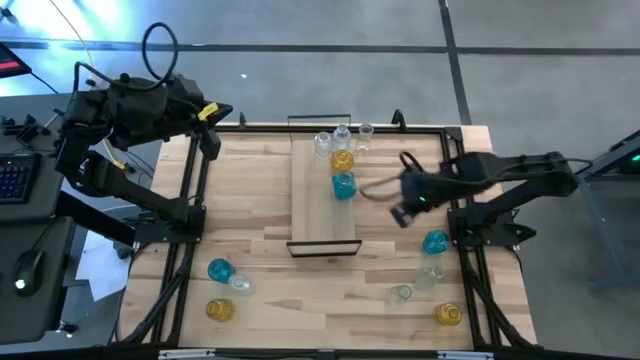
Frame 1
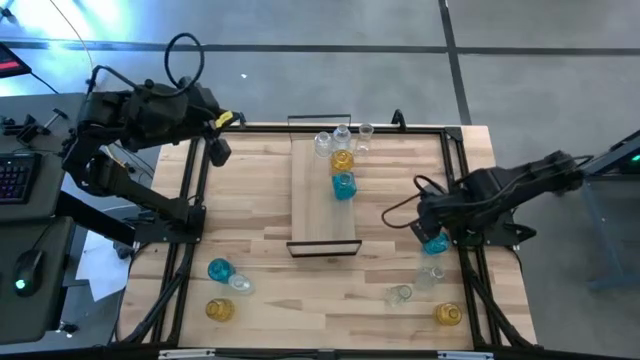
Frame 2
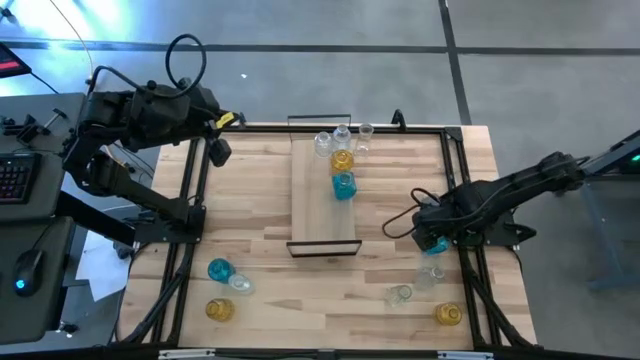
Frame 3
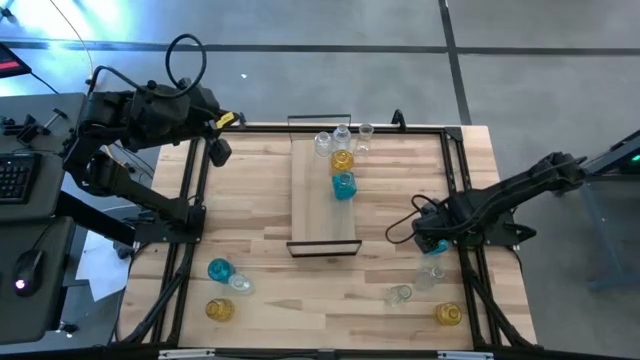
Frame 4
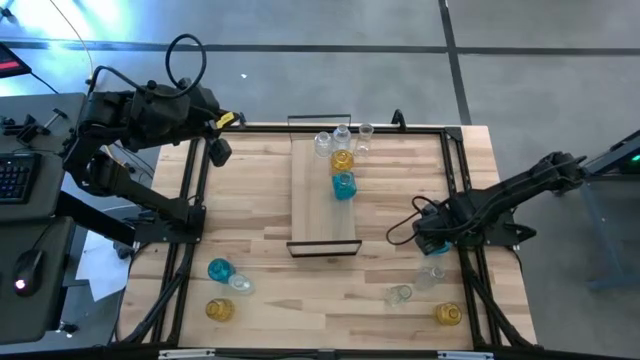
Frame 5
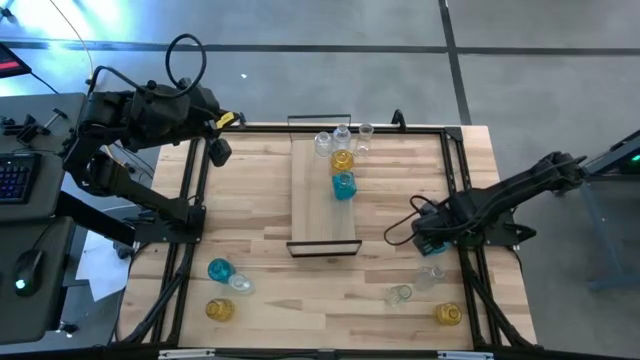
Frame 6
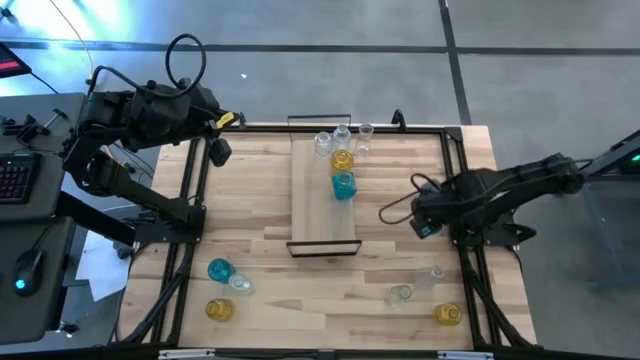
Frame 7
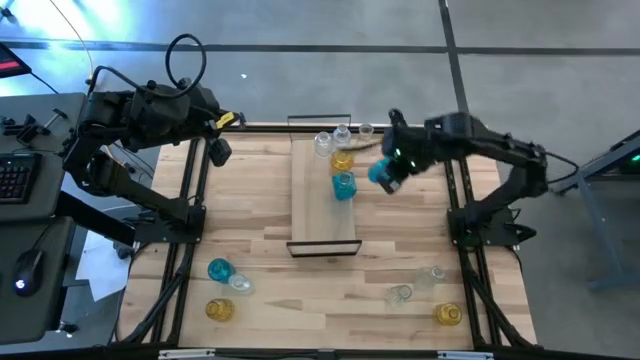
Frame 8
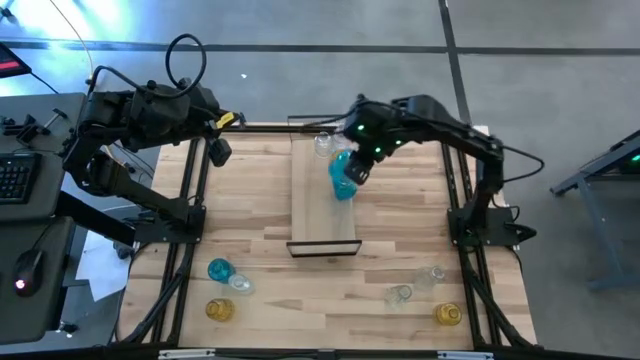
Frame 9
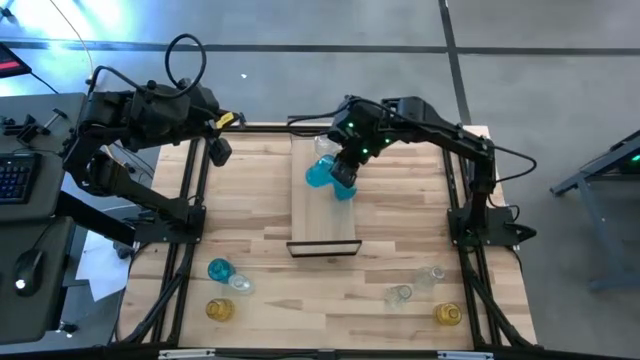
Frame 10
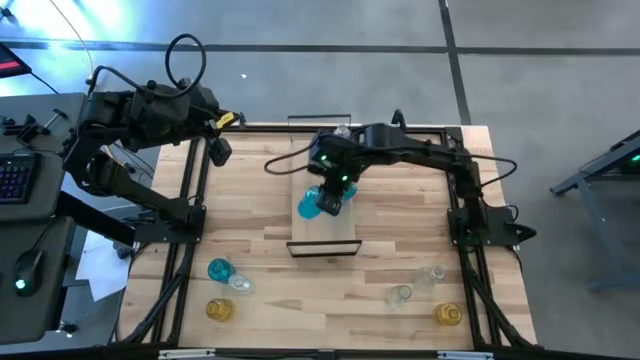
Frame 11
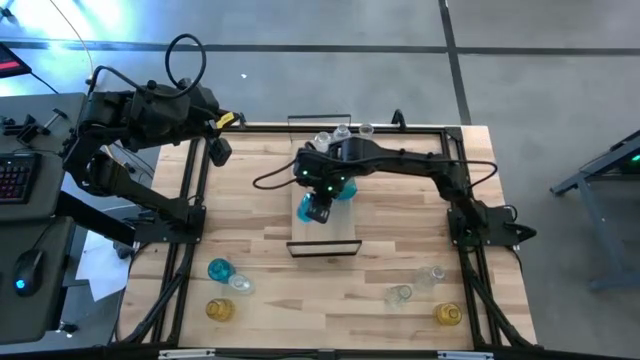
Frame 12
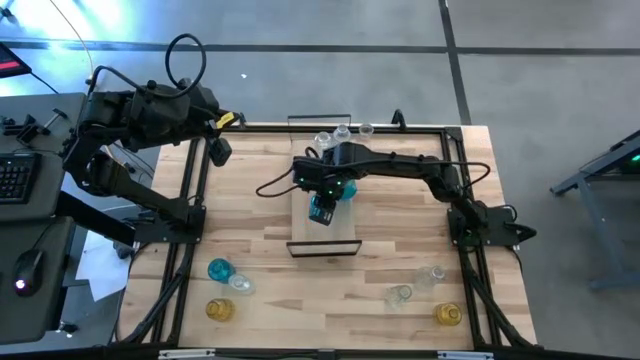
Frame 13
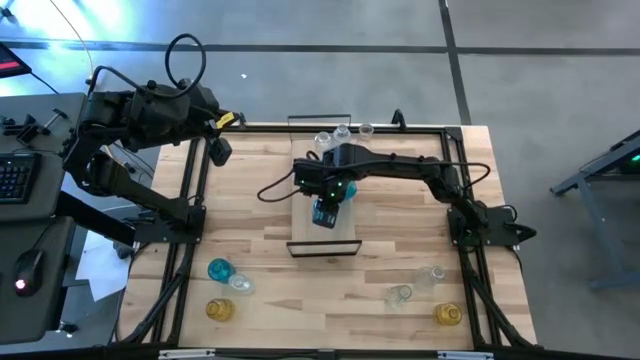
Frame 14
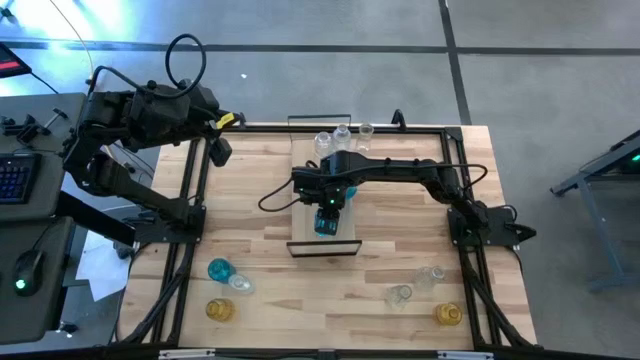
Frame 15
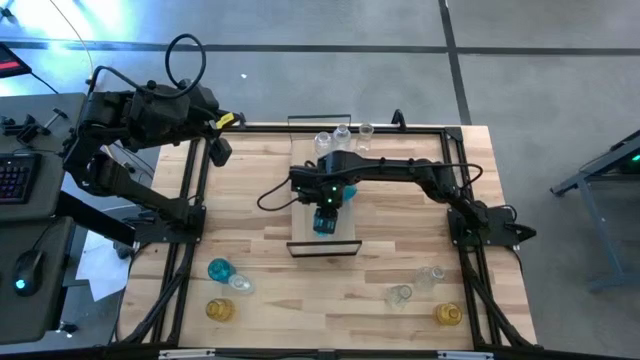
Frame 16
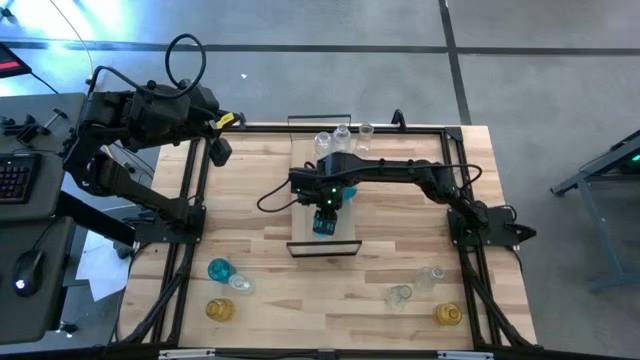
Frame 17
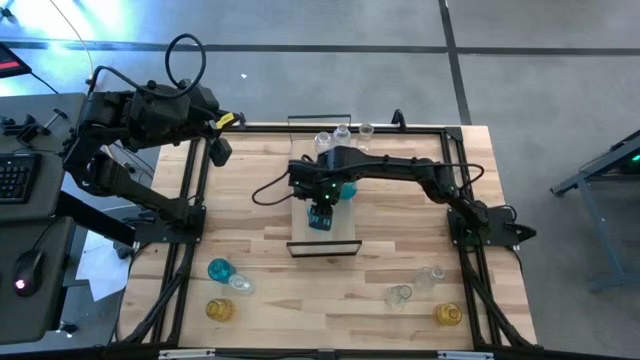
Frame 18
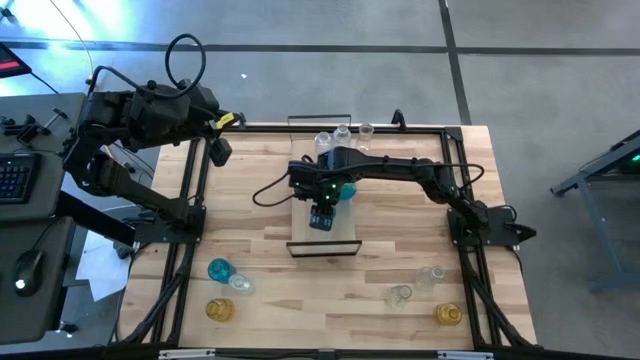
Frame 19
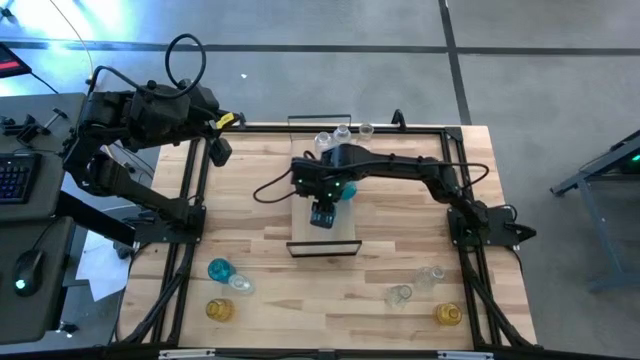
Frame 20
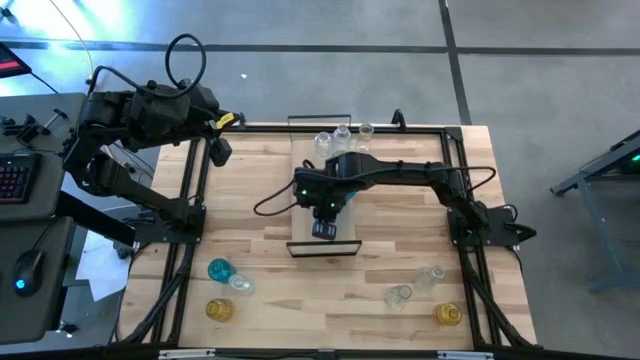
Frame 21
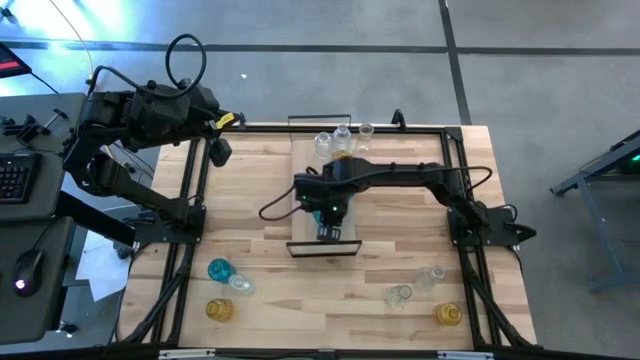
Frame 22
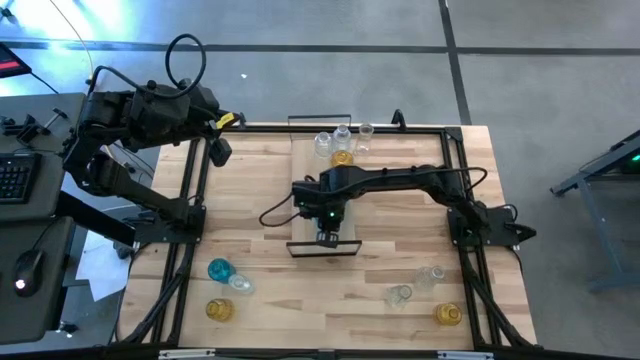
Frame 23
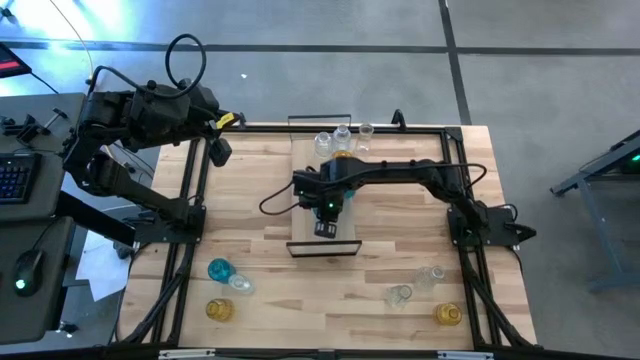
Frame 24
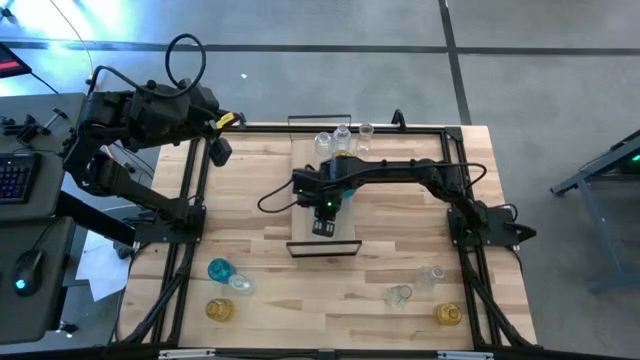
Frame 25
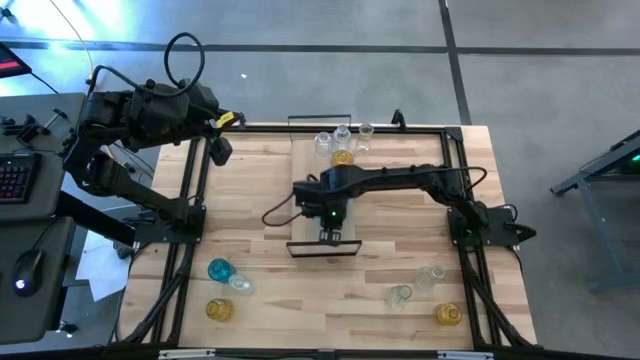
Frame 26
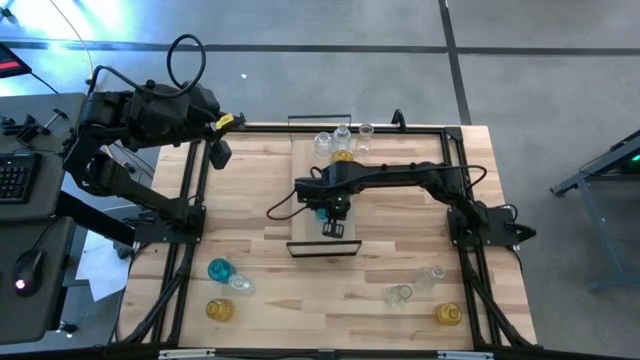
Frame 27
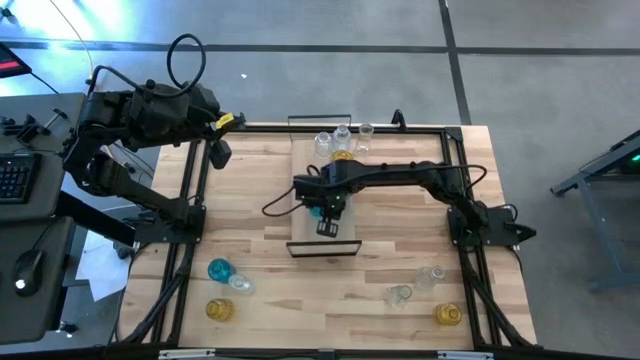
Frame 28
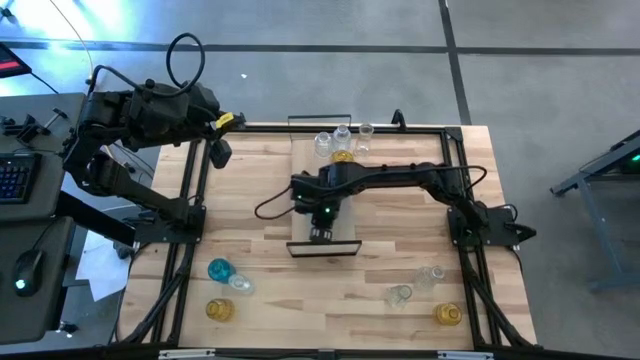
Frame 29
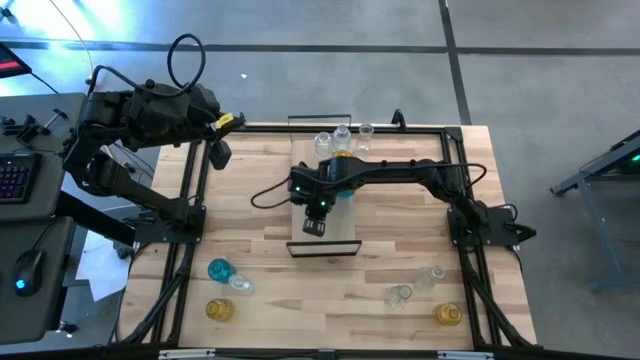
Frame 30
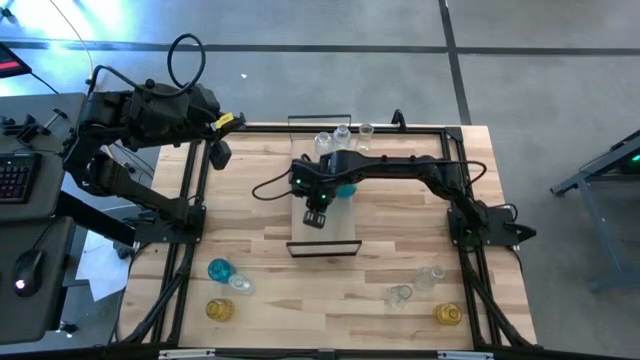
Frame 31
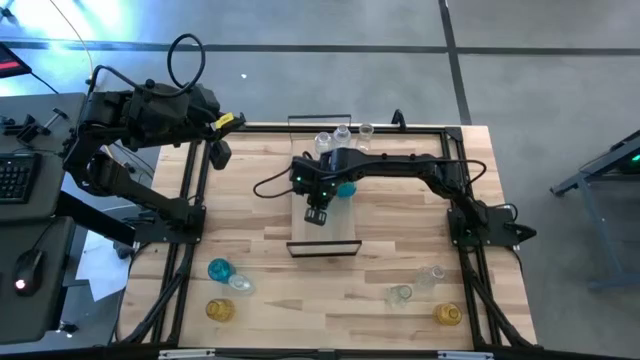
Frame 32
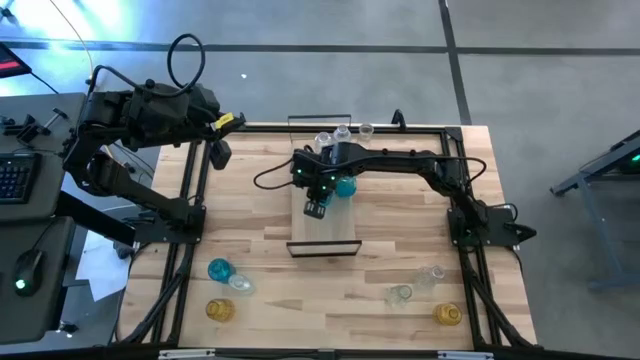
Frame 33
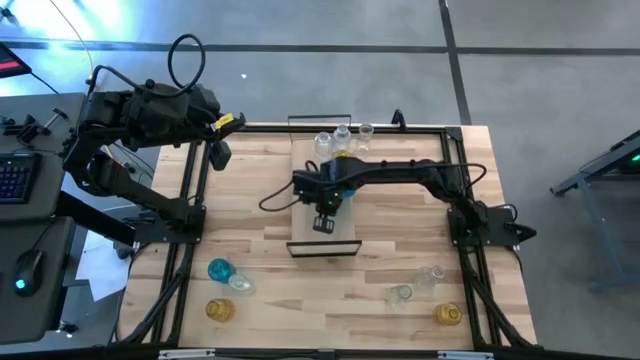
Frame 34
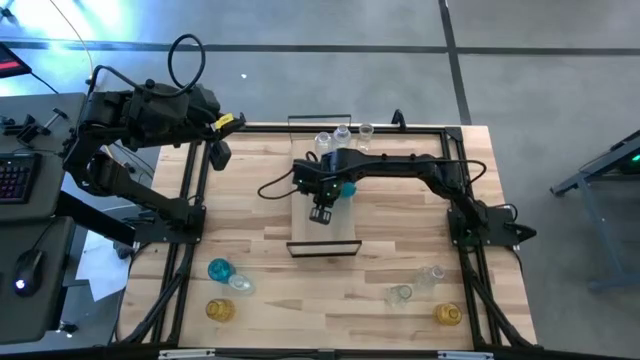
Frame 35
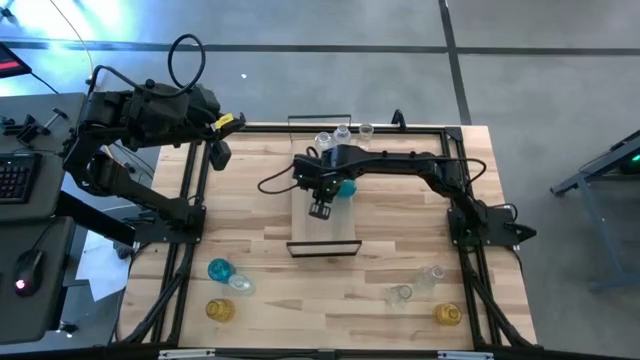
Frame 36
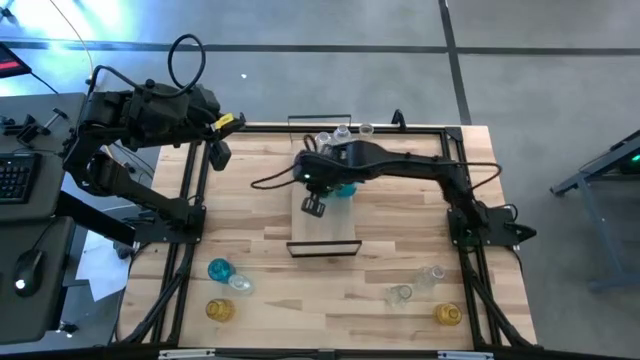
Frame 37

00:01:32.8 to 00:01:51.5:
Task: sort vases onto shelf
Put the right blue flower vase on the shelf aligned with the other blue flower vase

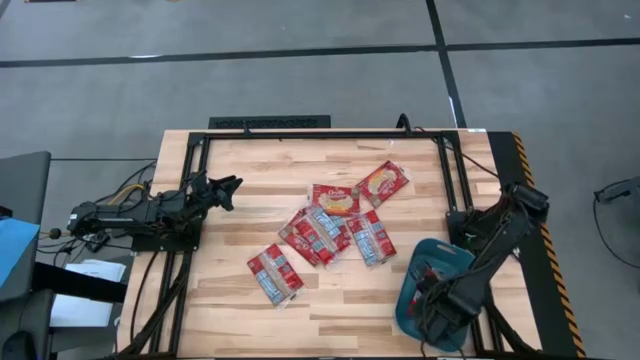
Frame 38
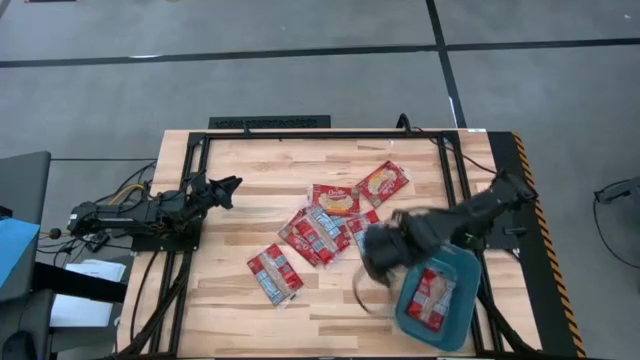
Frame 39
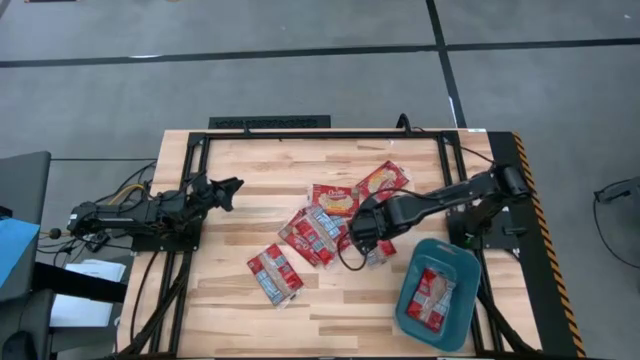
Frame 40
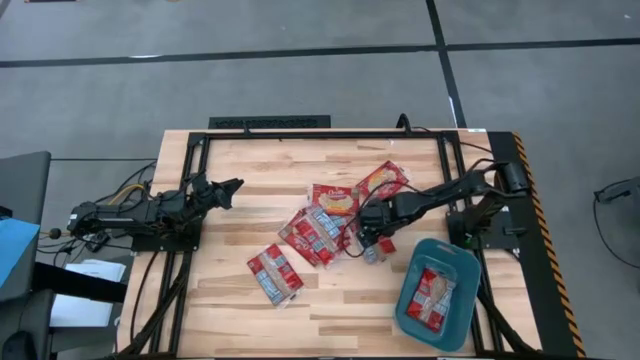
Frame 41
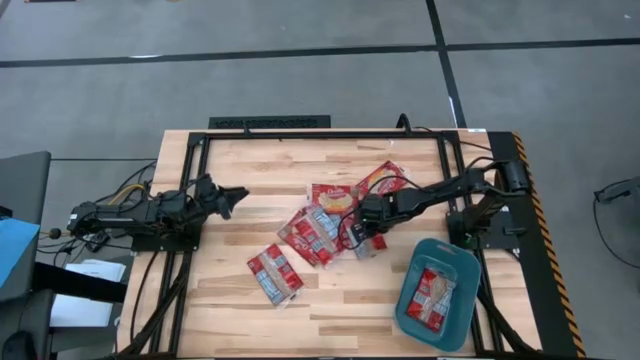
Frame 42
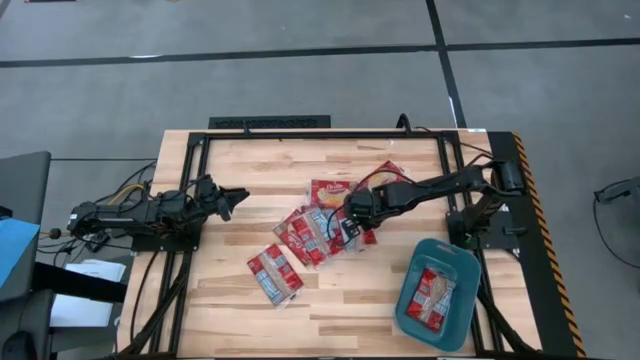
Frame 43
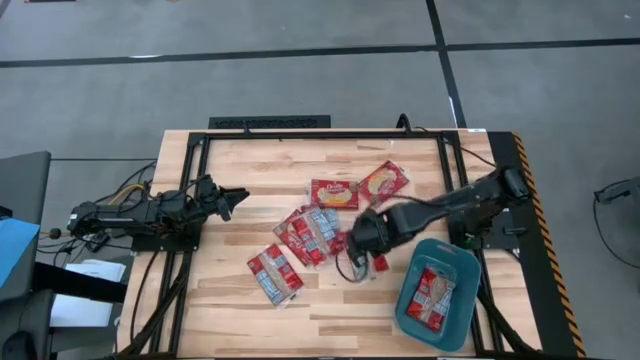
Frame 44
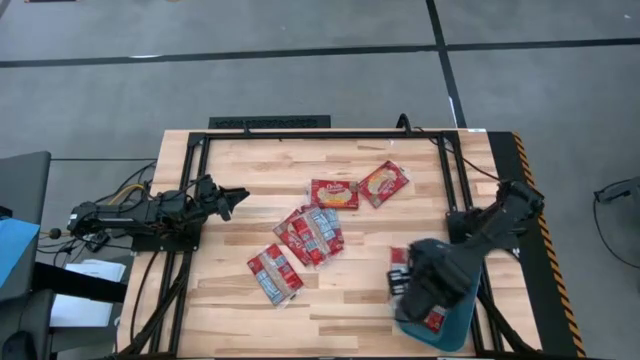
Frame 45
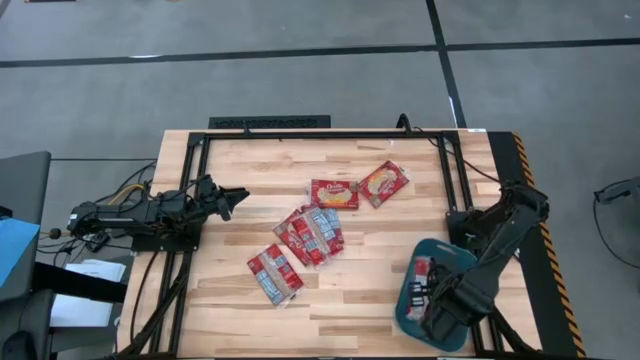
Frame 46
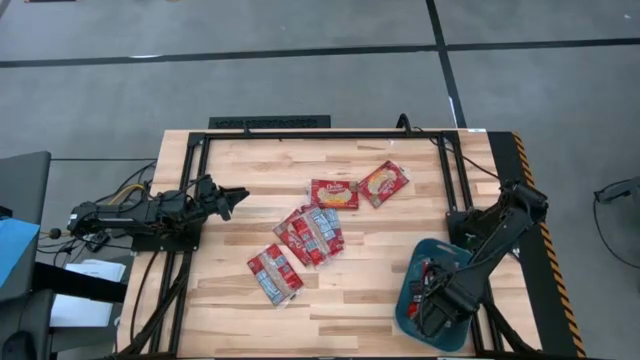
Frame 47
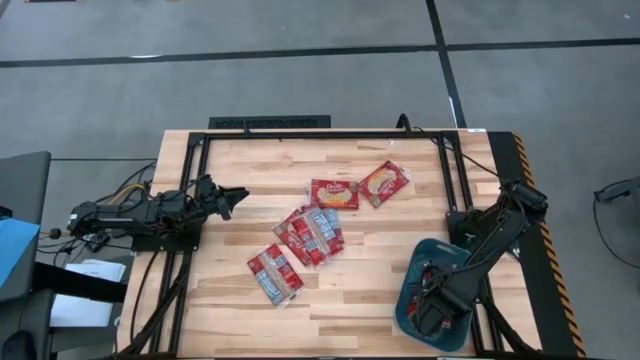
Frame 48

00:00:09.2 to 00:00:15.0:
Task: Sort popcorn bags into baskets
Put the popcorn bag into the blue bin
